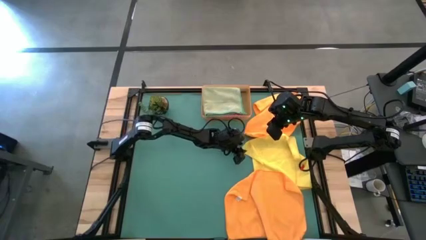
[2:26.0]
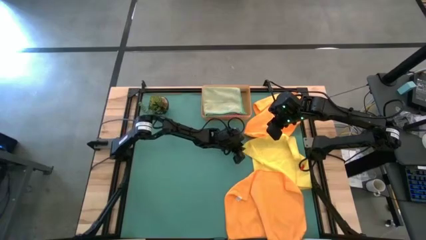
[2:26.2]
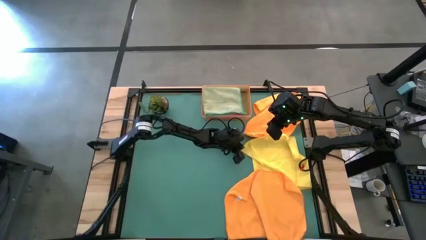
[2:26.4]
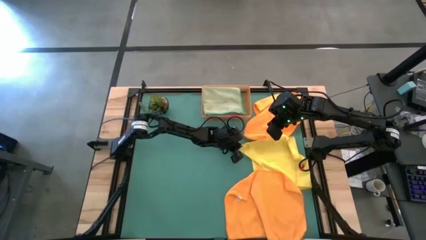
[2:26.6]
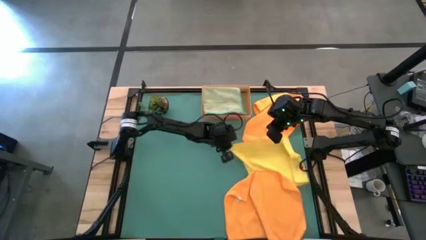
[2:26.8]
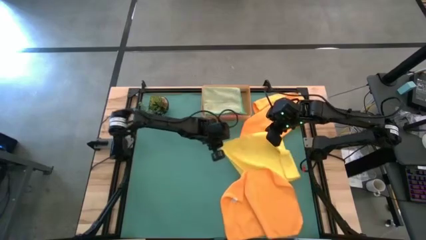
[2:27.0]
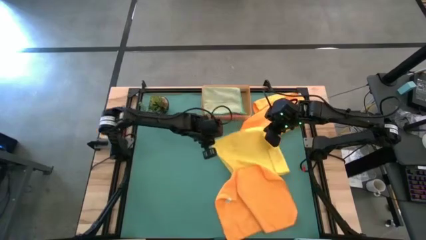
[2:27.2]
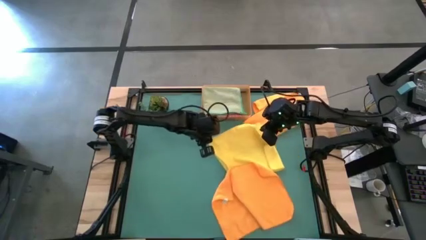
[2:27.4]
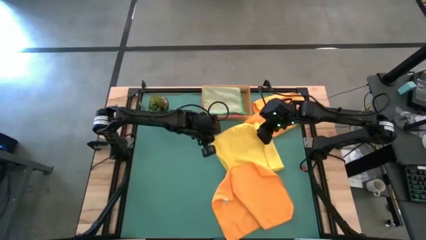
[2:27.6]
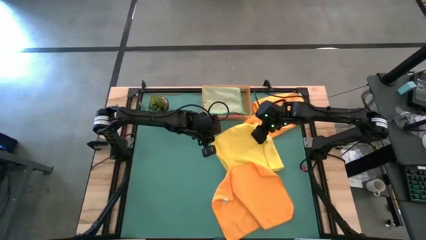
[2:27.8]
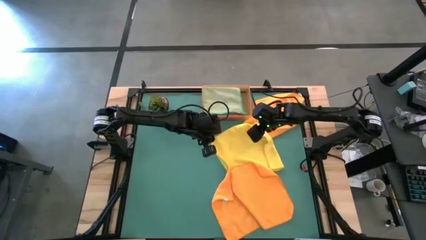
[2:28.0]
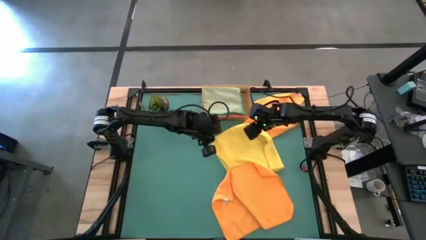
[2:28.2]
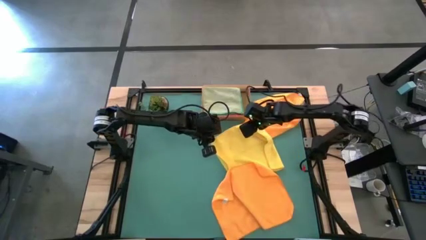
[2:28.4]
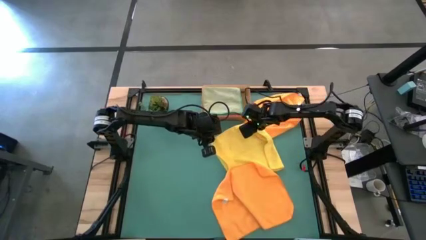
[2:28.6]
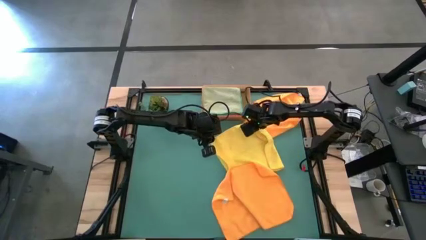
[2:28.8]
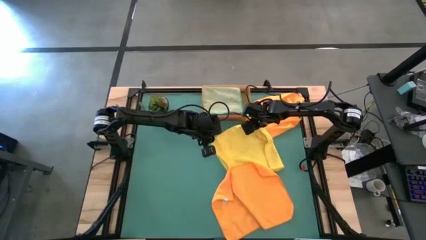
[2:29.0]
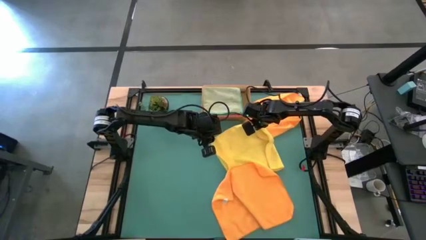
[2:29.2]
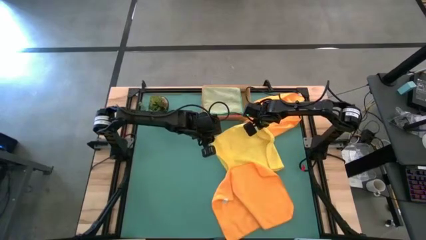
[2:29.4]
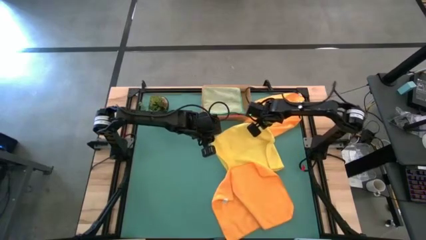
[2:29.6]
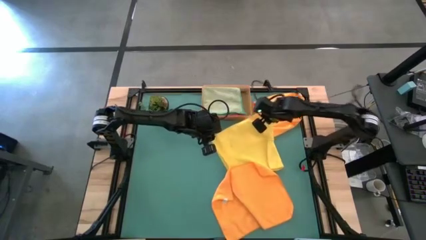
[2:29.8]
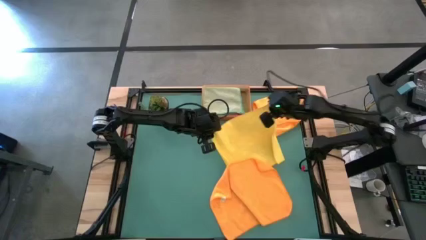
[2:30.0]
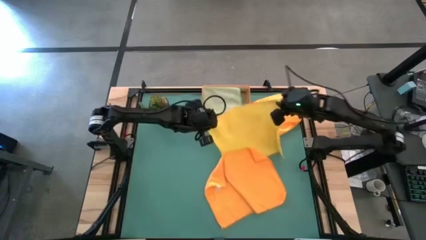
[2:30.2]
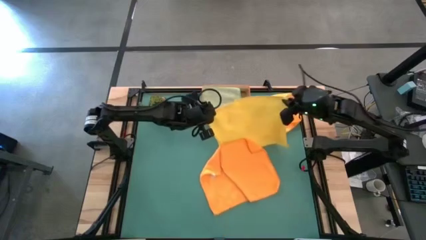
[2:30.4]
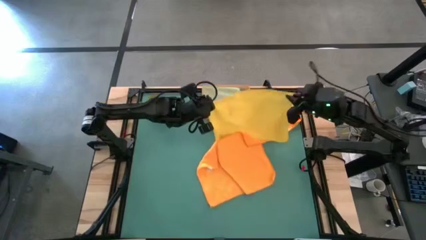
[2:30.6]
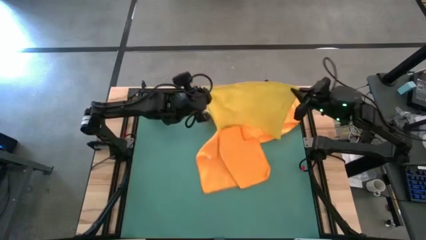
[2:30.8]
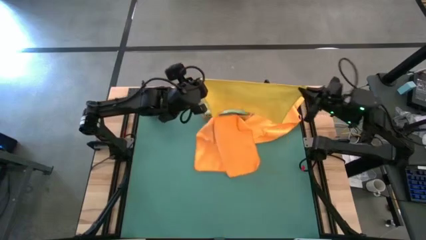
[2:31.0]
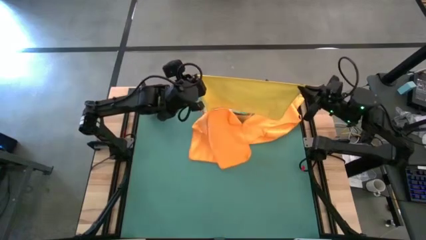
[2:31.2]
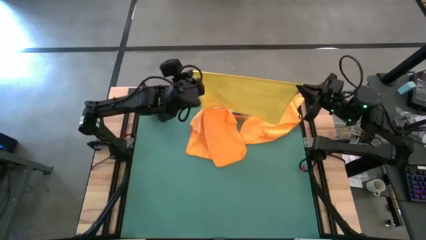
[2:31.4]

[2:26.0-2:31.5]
Task: Fold microfiber towels
Fold the yellow microfiber towel

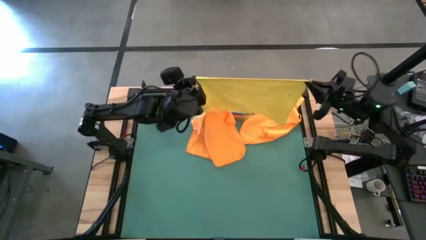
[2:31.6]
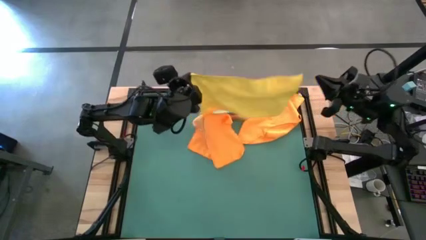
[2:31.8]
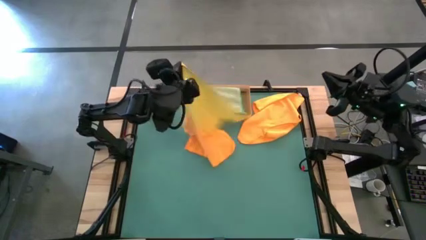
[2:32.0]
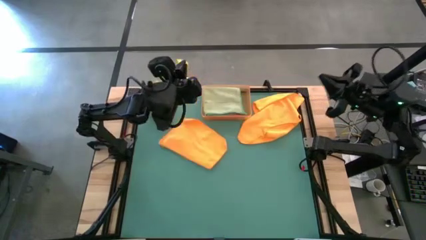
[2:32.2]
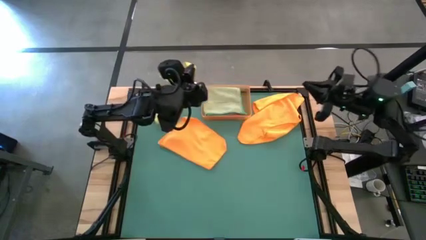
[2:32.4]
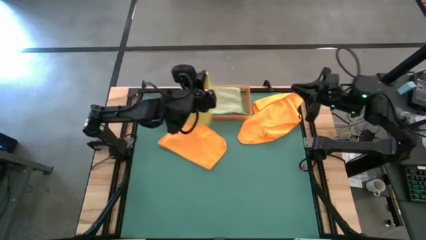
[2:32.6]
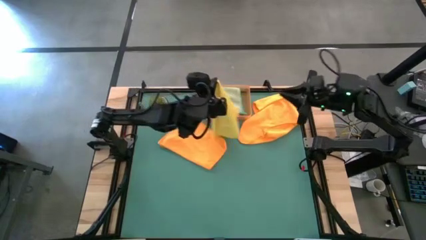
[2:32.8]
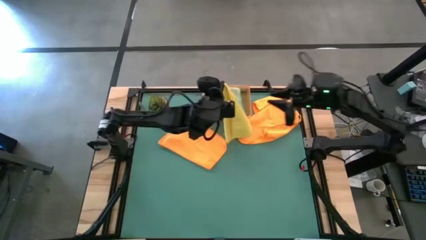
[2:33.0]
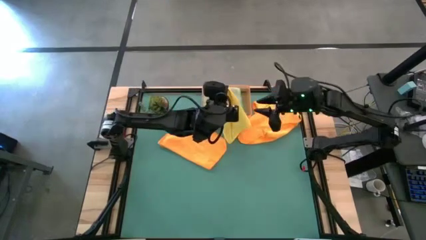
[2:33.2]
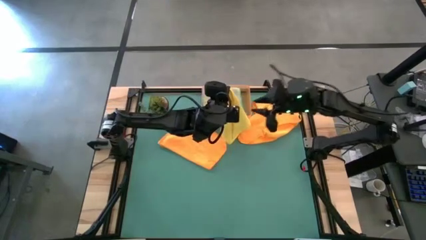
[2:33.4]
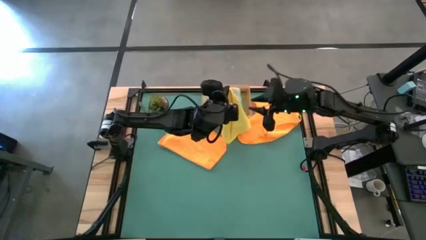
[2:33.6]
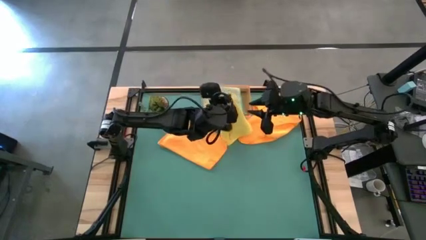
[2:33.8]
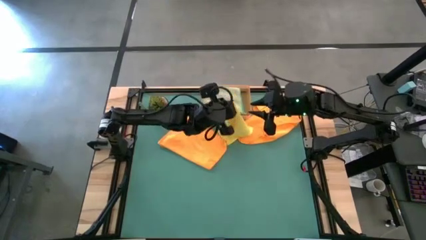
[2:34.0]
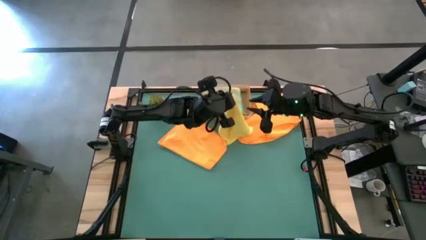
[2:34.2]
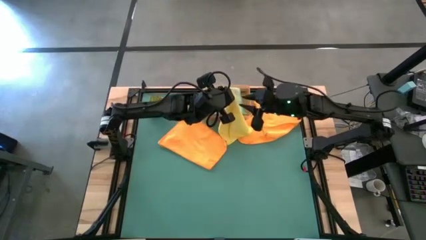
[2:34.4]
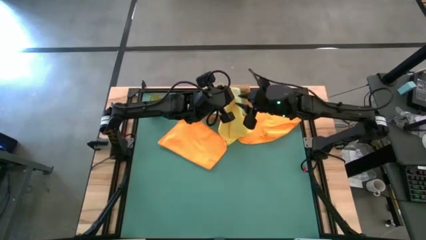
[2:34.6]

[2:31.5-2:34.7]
Fold the yellow microfiber towel

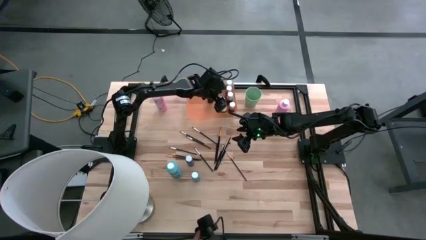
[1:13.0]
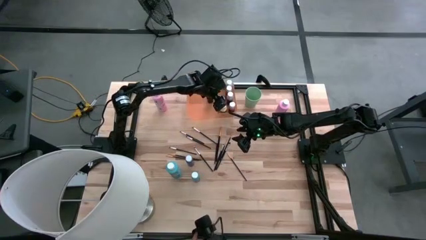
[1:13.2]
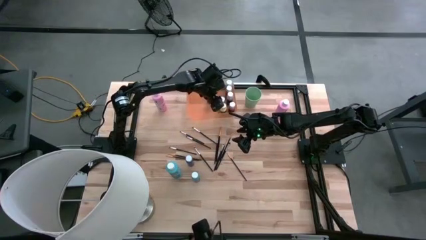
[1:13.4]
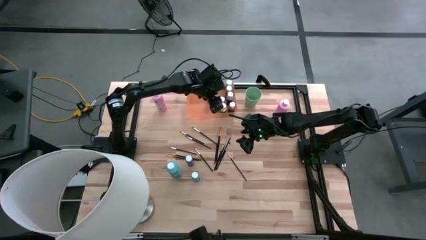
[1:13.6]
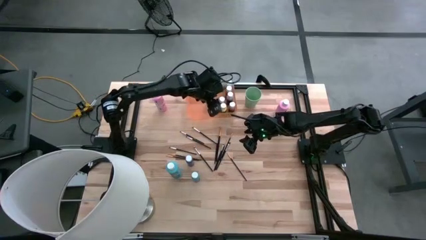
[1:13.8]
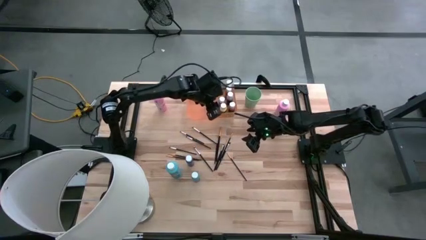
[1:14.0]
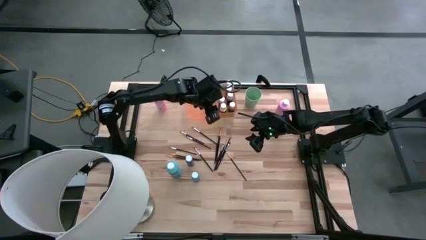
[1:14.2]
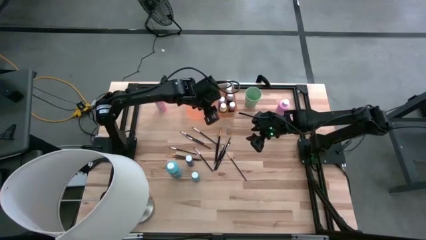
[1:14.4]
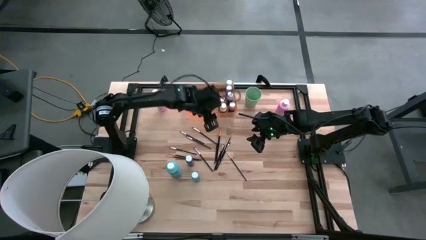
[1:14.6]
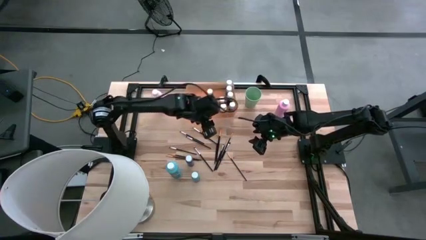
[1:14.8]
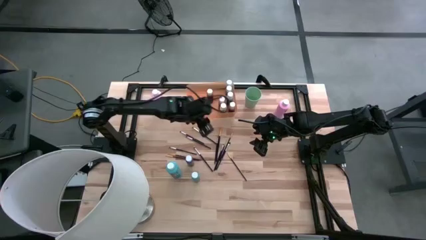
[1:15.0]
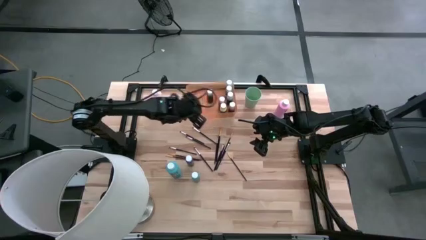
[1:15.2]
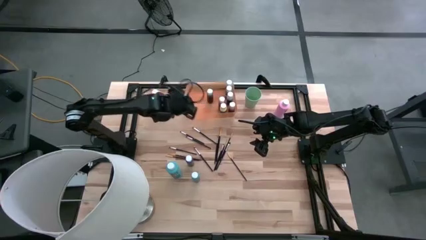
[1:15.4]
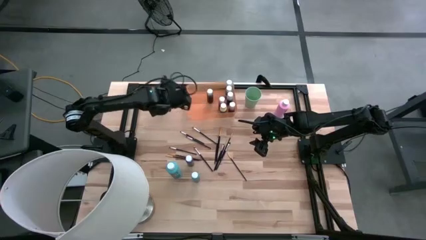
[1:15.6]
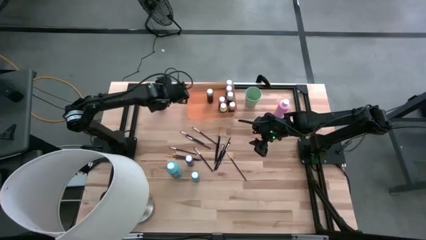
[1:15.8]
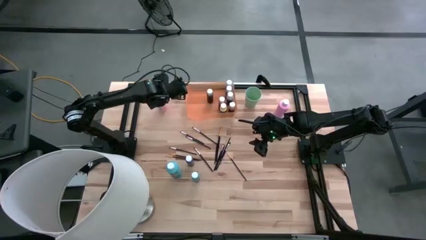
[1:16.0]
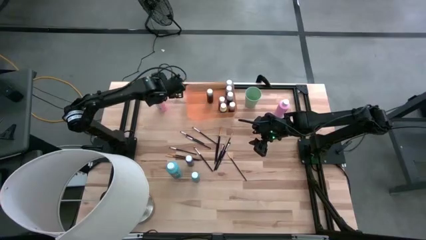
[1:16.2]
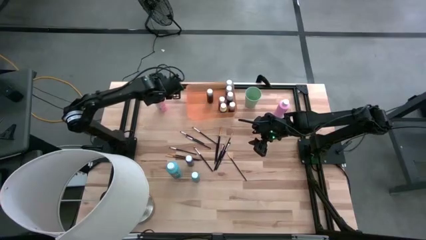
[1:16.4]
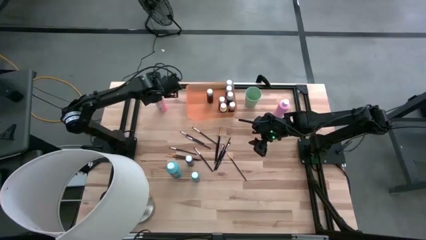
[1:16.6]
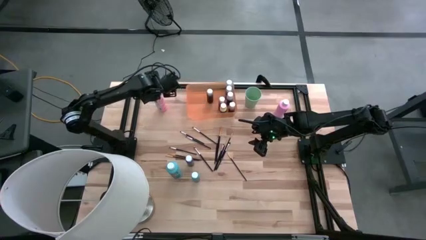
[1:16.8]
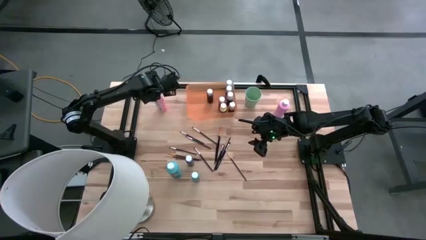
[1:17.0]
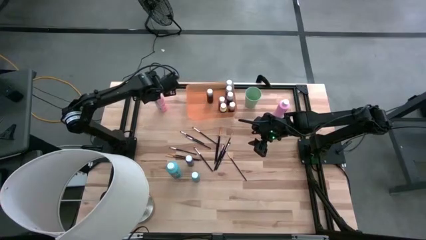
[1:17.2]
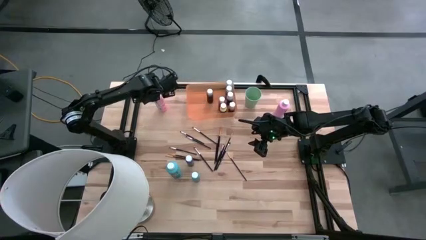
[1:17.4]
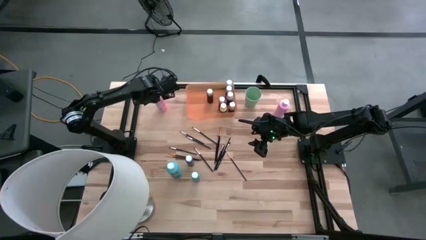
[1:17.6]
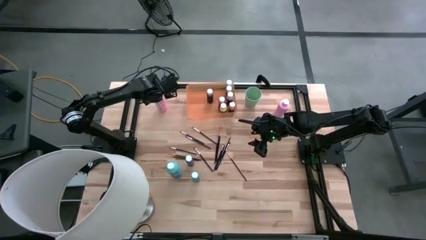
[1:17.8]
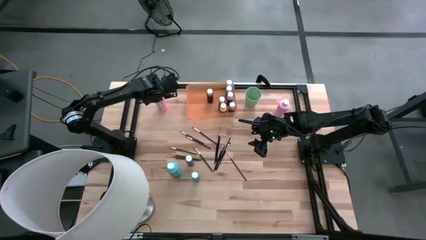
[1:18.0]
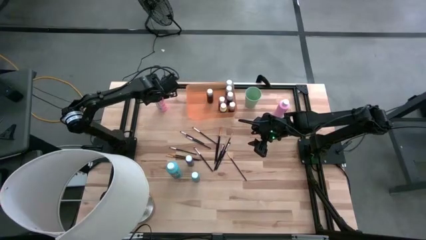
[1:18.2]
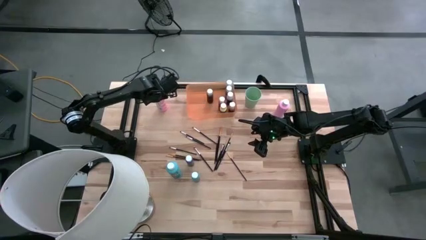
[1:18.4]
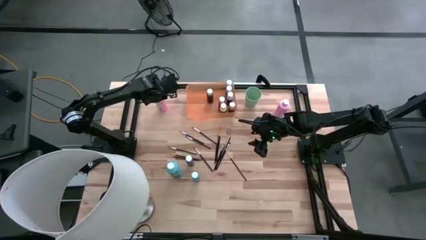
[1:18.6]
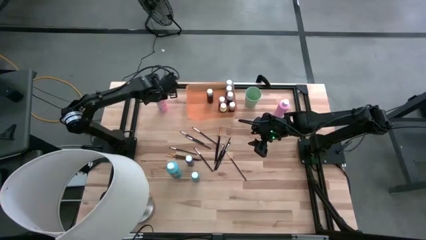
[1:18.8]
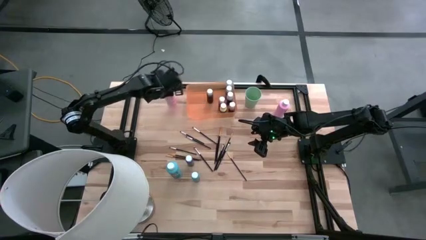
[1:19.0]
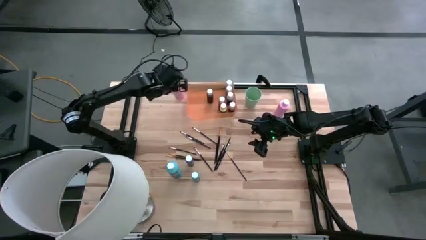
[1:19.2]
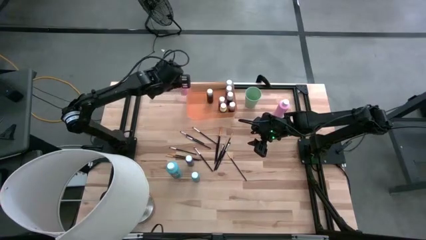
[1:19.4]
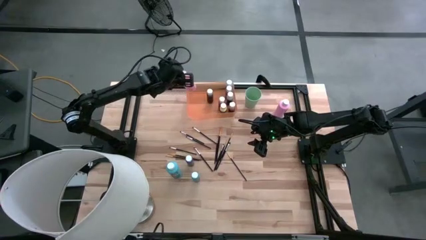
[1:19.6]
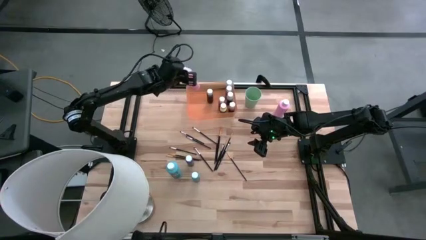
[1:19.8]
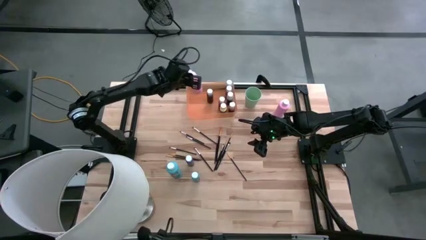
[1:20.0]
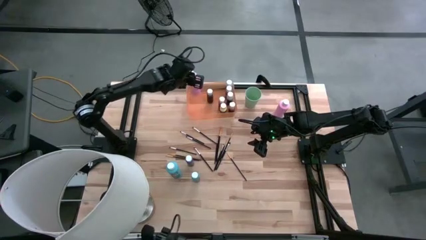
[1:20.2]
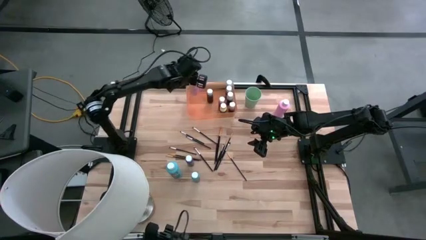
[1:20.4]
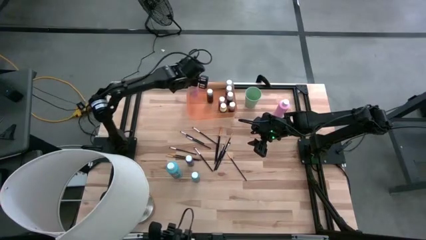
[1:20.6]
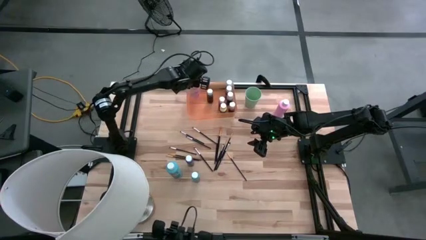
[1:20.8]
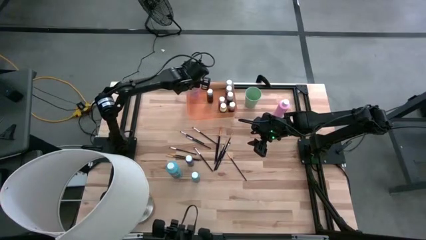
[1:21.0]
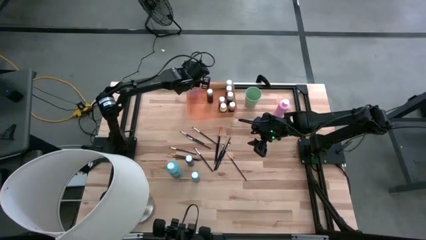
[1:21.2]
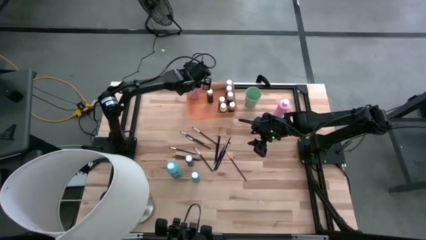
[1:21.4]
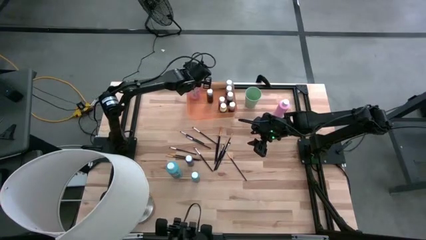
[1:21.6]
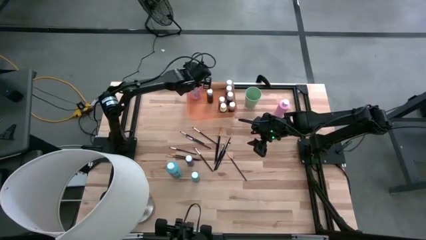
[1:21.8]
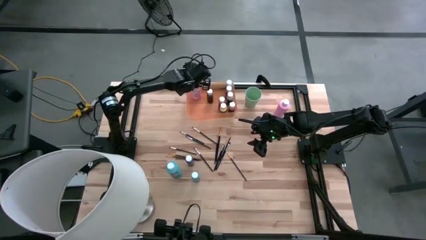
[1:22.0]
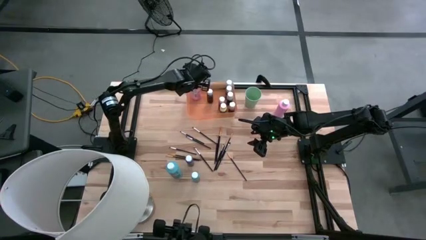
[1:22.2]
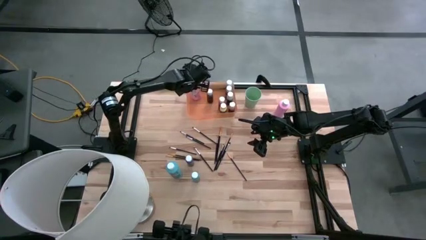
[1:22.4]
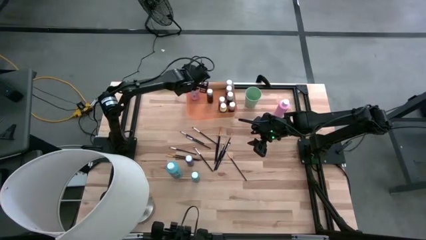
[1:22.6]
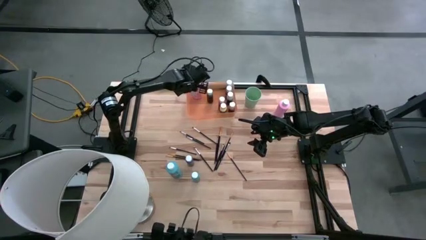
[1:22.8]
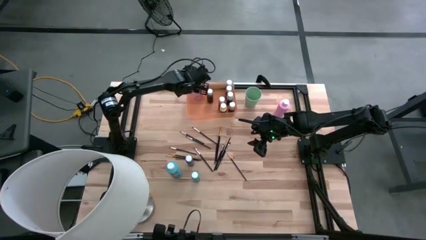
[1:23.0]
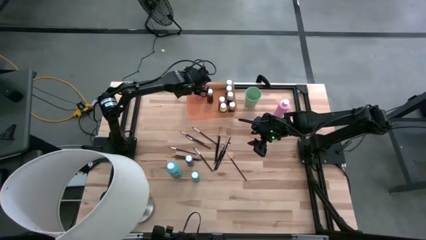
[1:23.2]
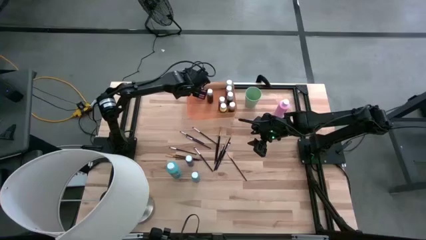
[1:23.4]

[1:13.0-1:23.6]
Task: Pick & Place Paint Supplies
Put the large pink paint bottle into the orange bin
